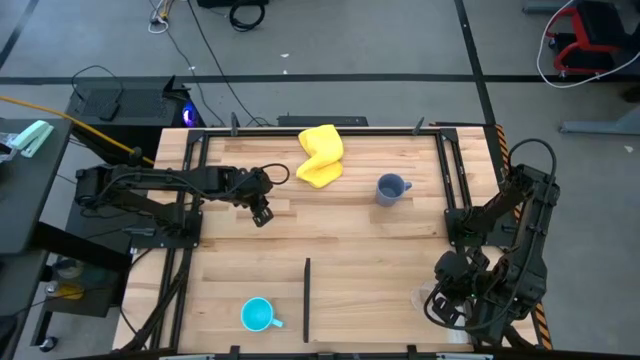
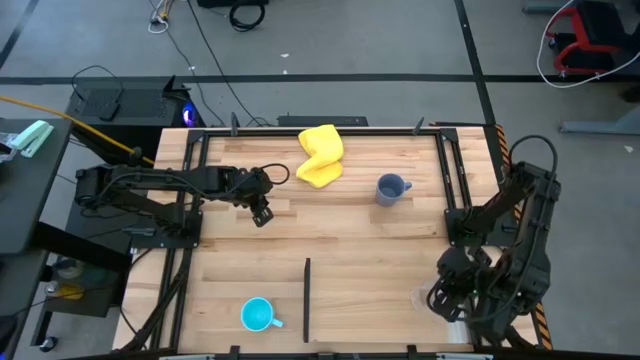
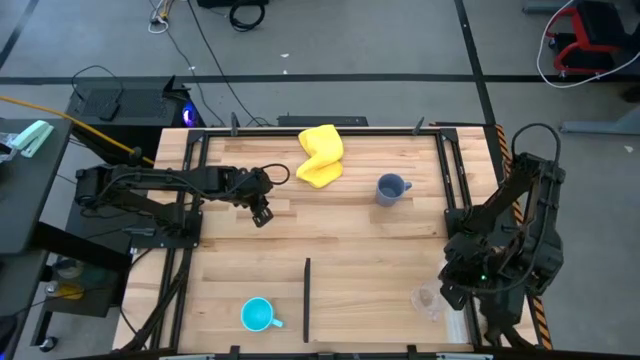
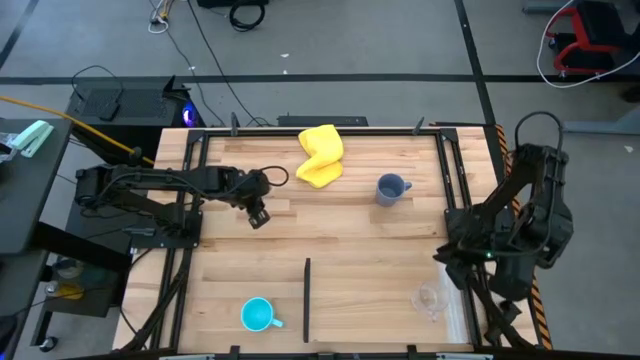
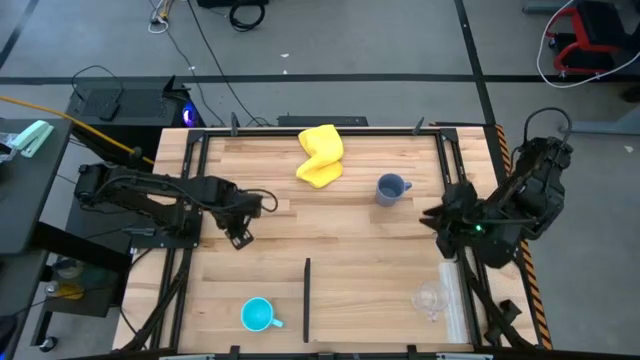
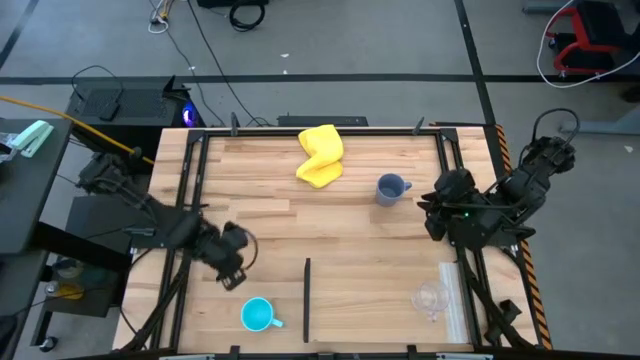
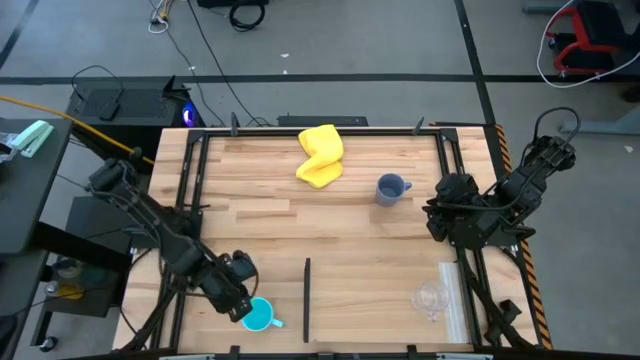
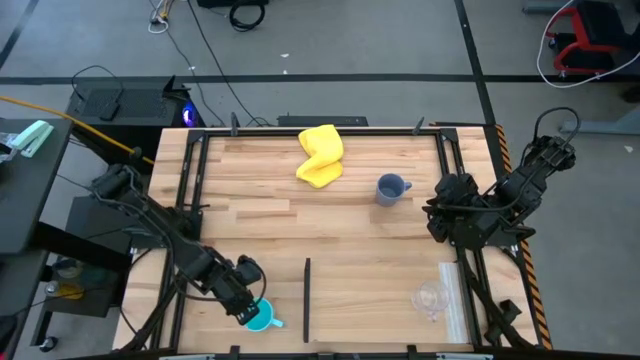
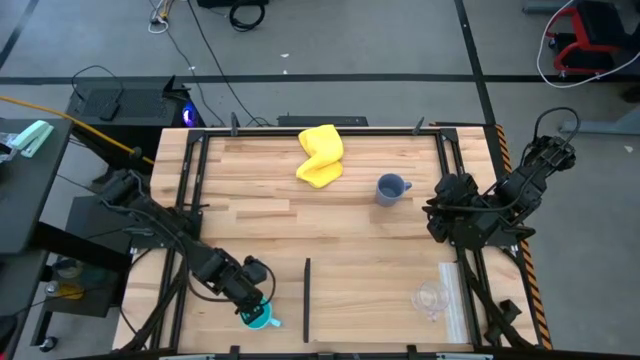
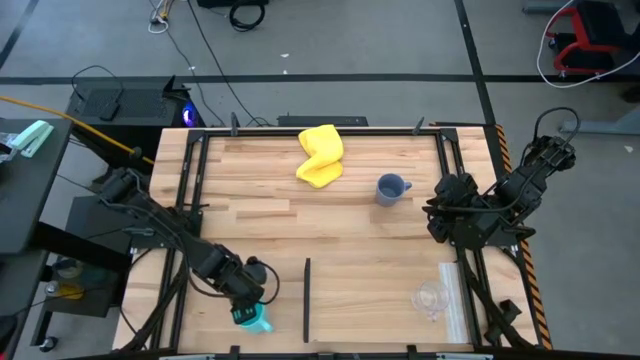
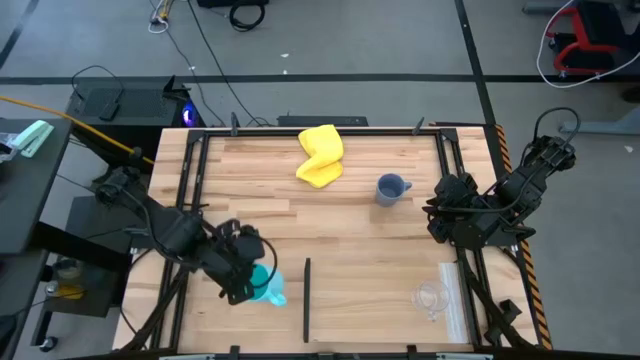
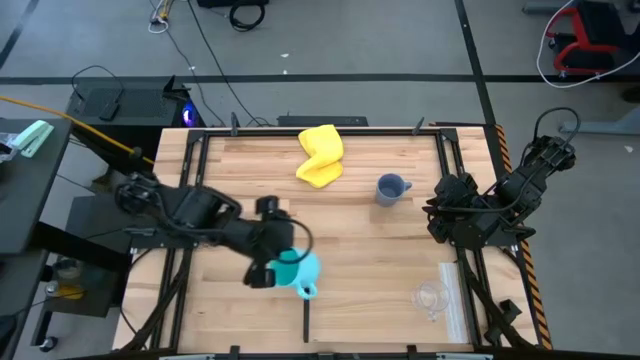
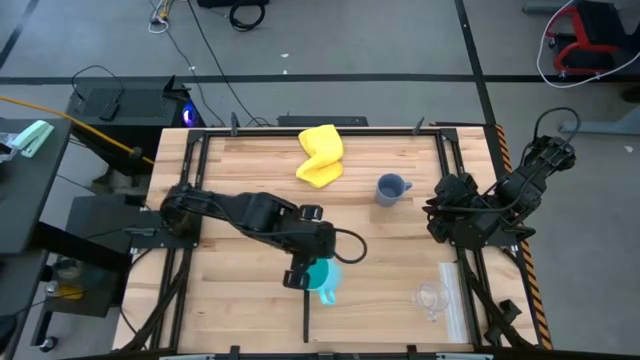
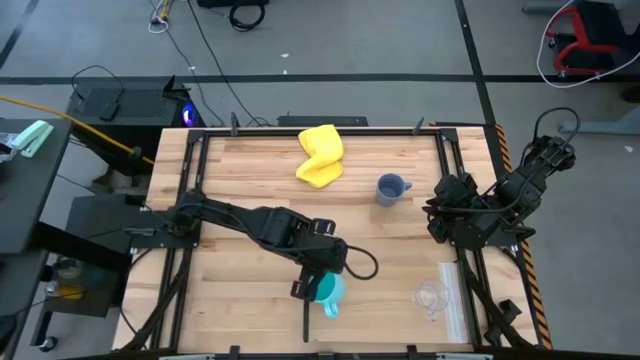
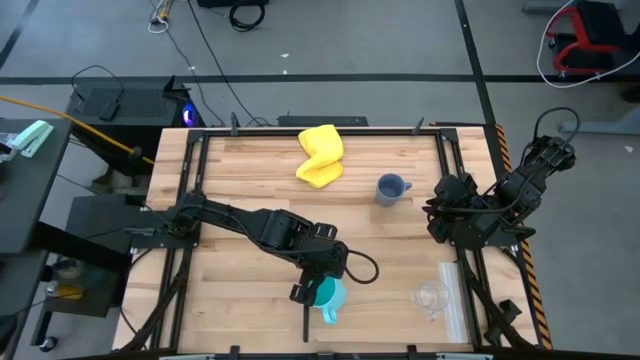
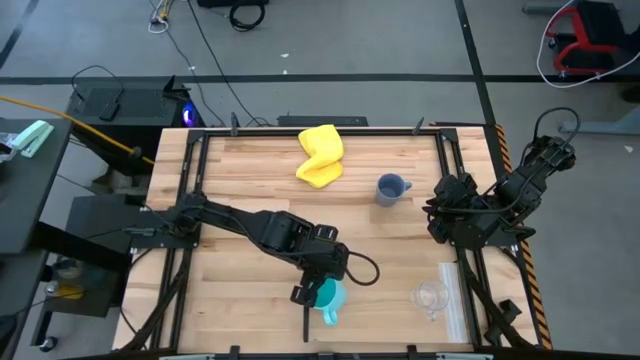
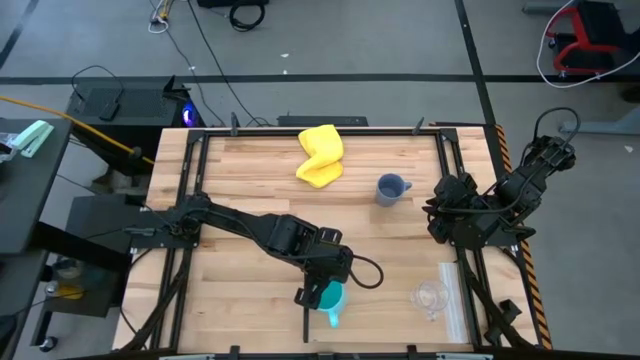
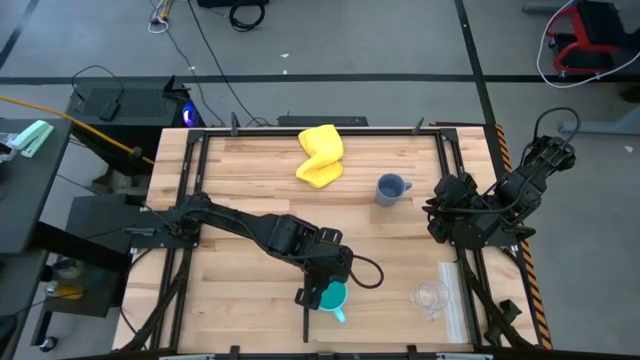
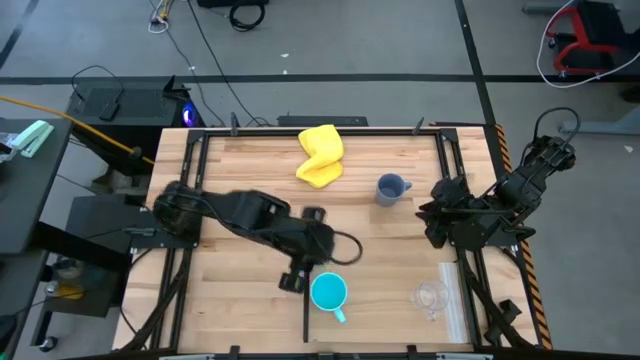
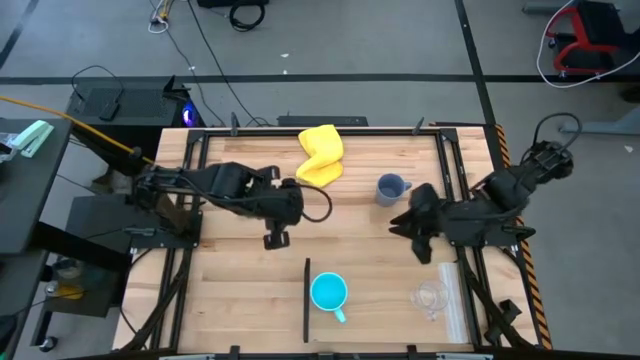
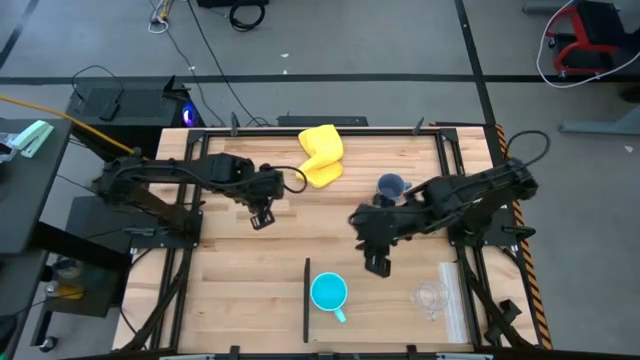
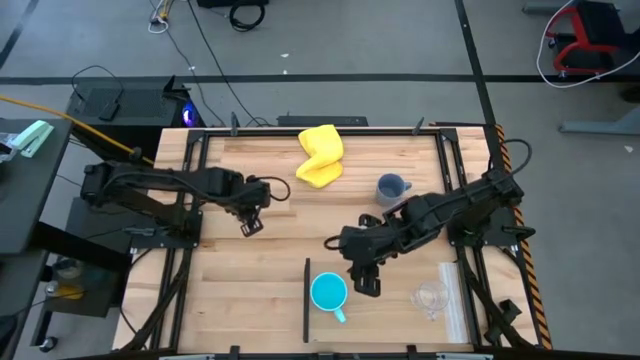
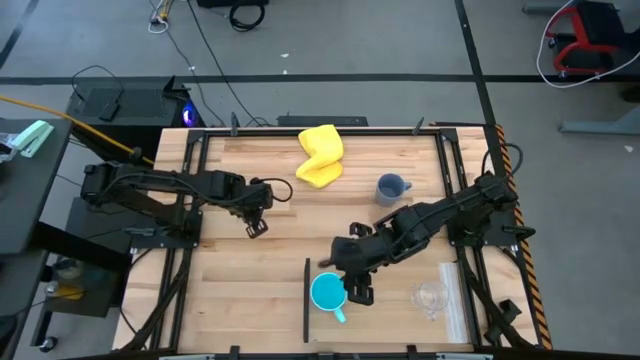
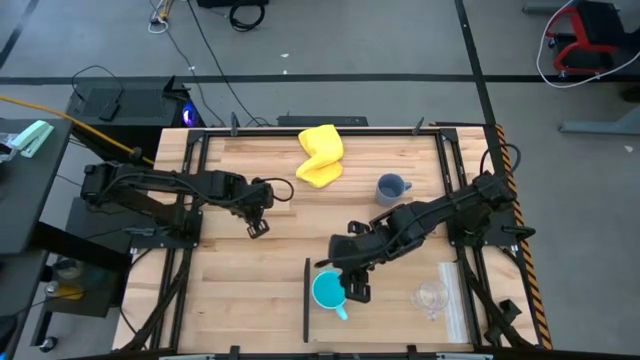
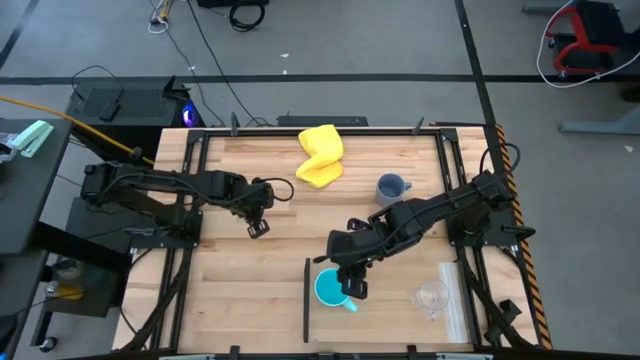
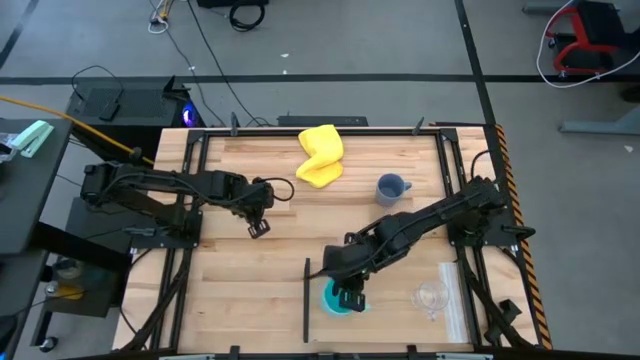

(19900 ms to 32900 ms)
Task: Stack small to large cups/mugs on shelf
Put the blue mug on the shelf

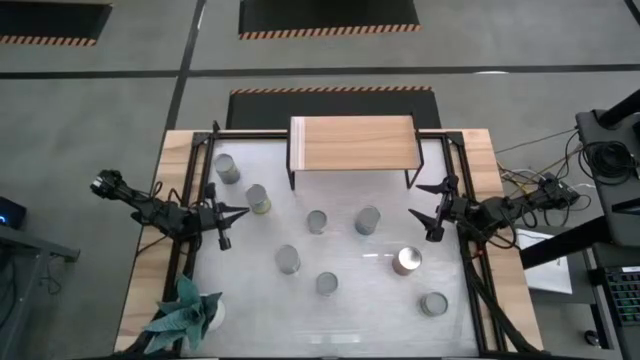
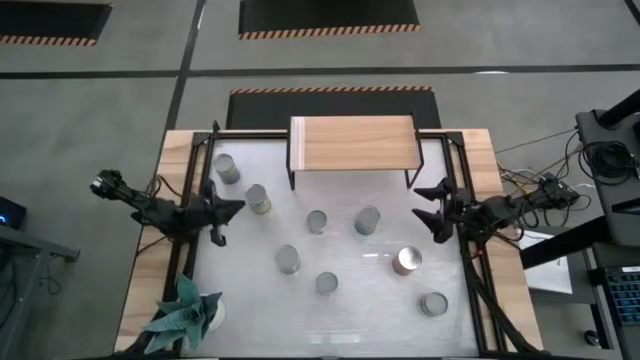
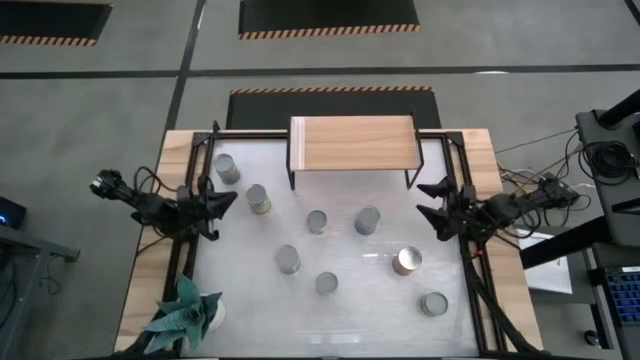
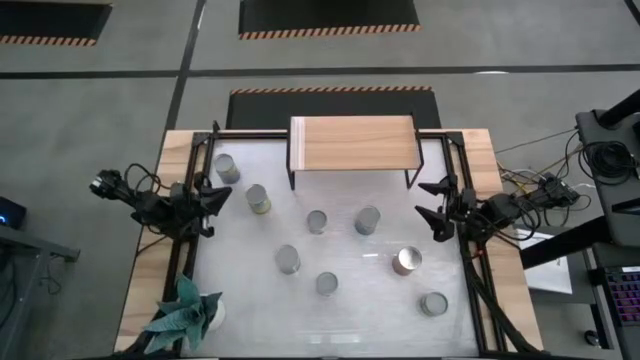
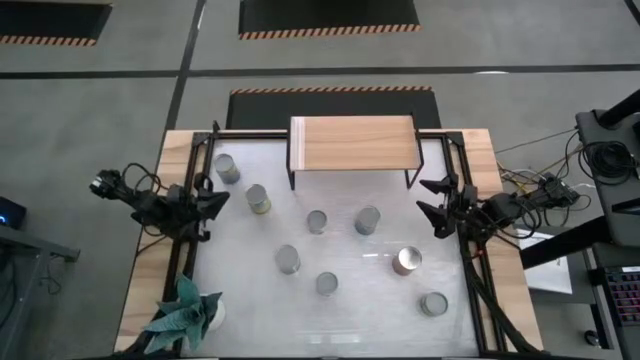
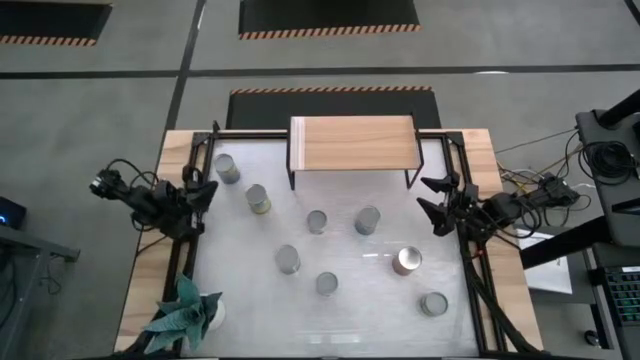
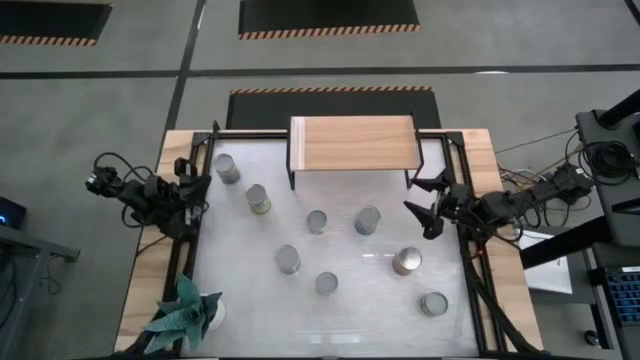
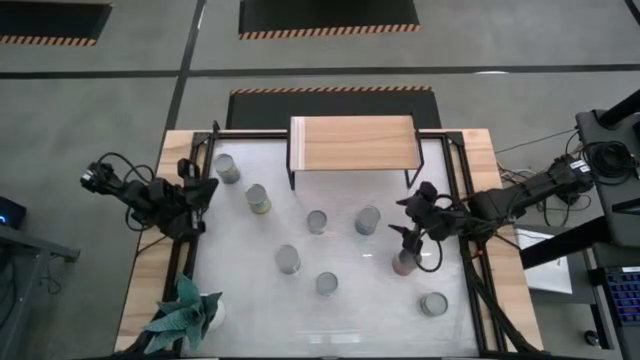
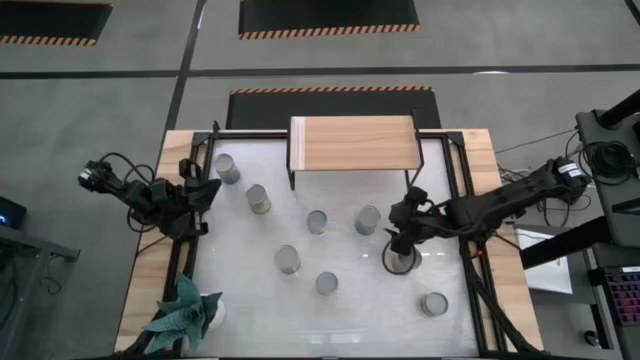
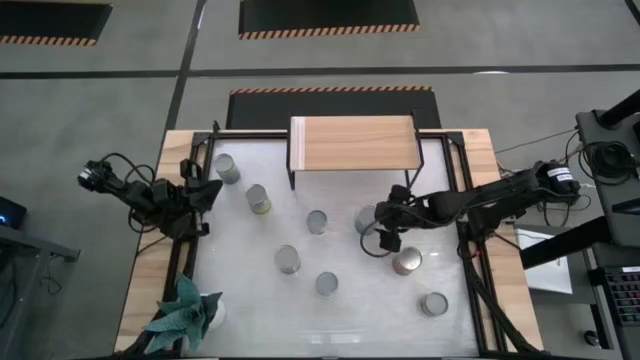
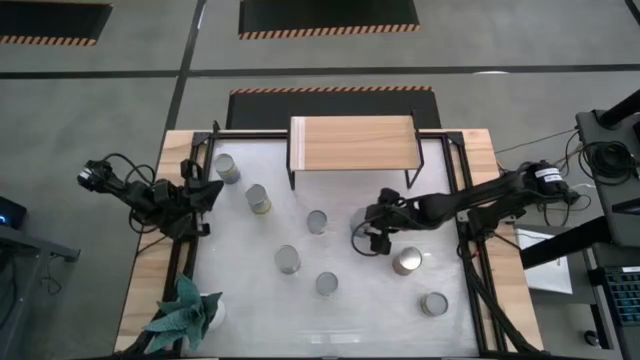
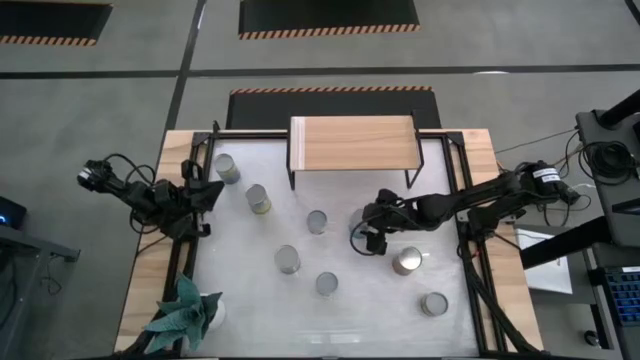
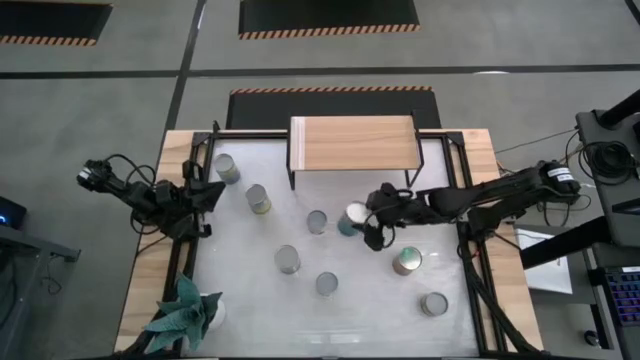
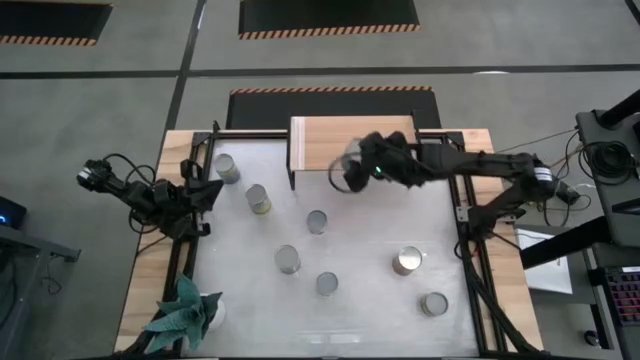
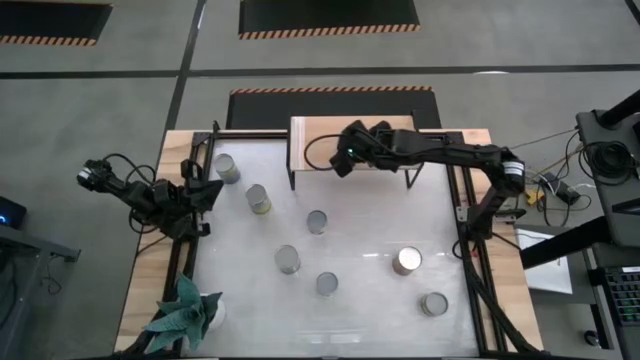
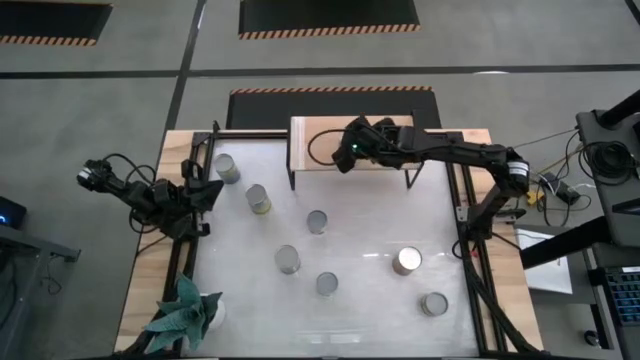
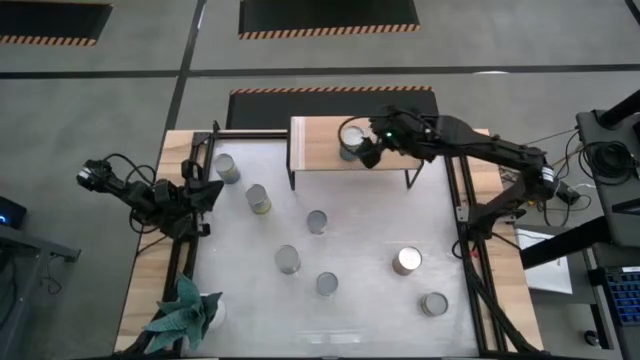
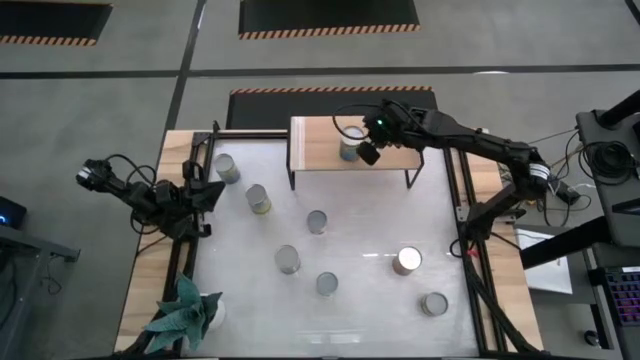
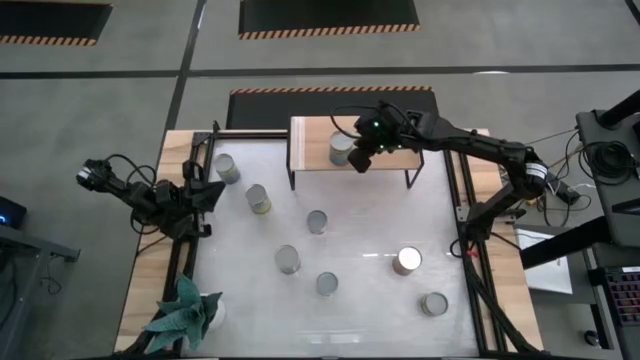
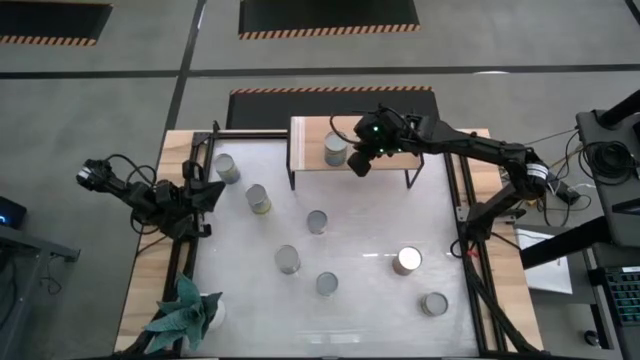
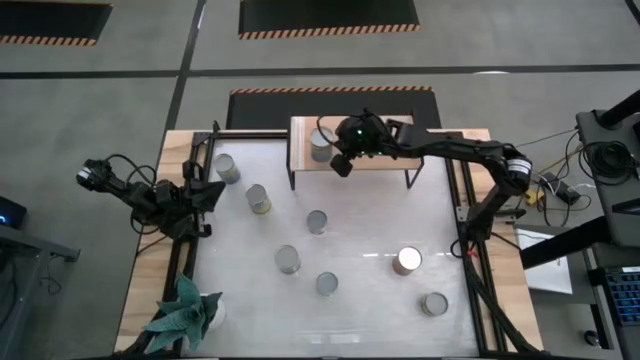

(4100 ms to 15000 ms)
Task: Pick and place cans onto a shelf
Put the canned cherries on the shelf
